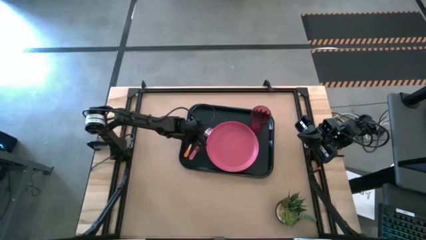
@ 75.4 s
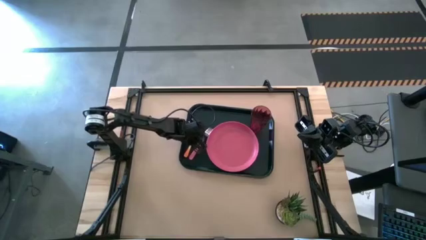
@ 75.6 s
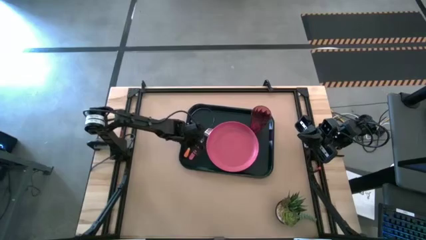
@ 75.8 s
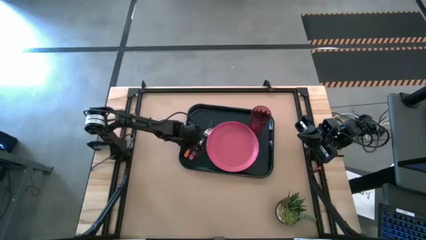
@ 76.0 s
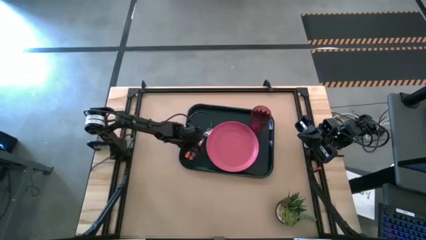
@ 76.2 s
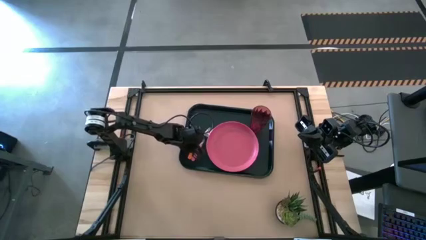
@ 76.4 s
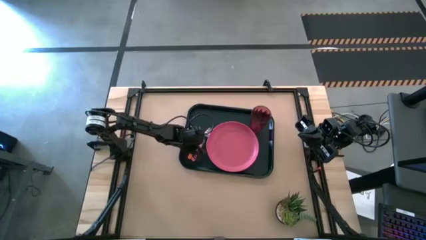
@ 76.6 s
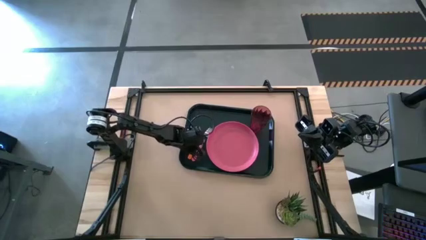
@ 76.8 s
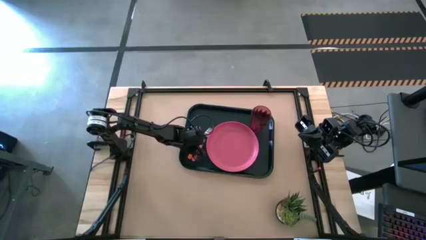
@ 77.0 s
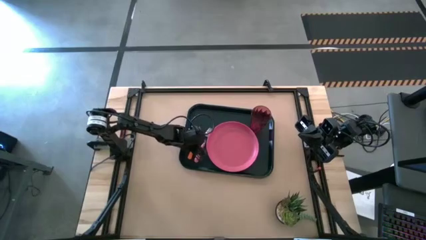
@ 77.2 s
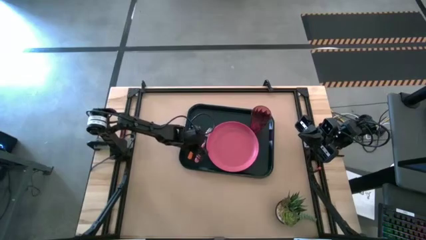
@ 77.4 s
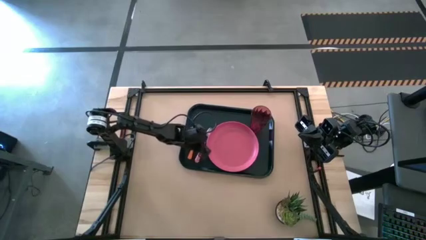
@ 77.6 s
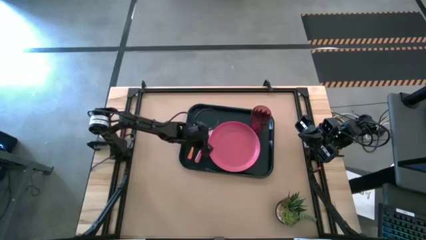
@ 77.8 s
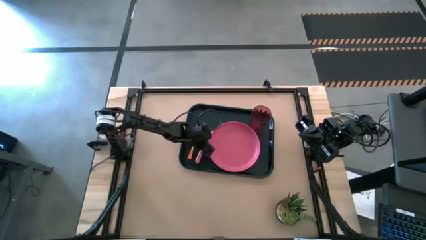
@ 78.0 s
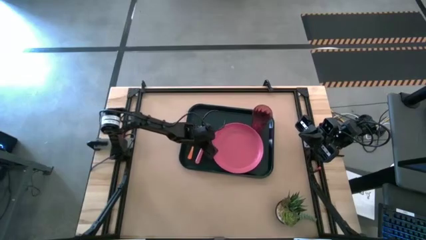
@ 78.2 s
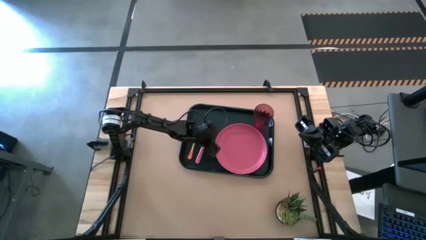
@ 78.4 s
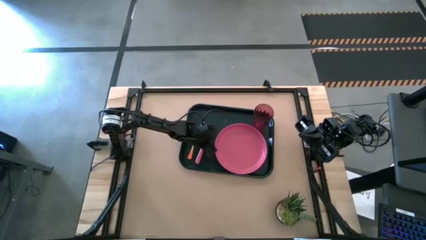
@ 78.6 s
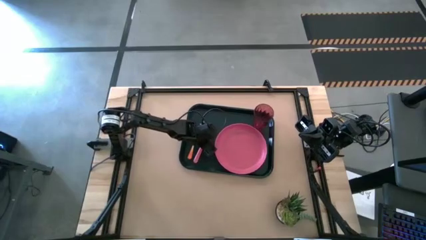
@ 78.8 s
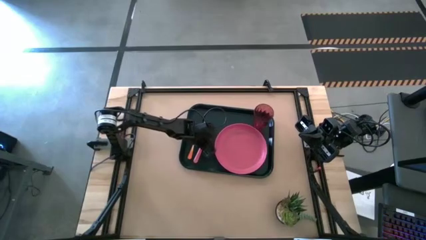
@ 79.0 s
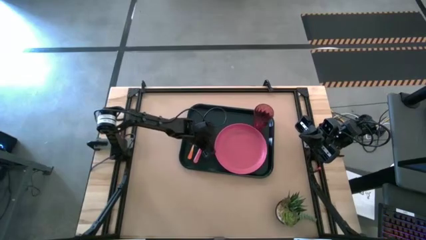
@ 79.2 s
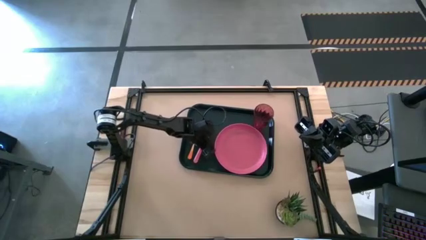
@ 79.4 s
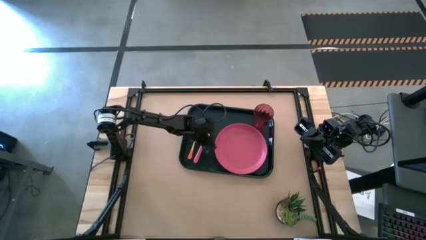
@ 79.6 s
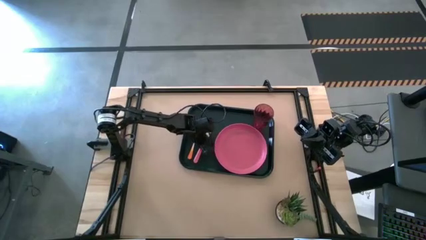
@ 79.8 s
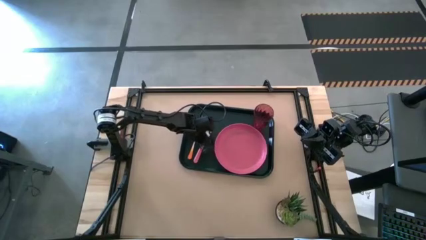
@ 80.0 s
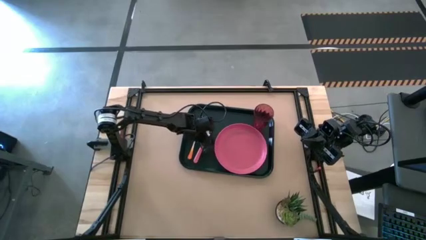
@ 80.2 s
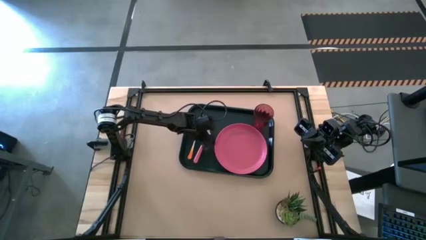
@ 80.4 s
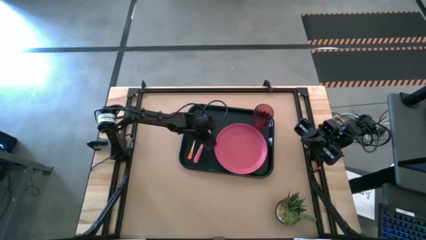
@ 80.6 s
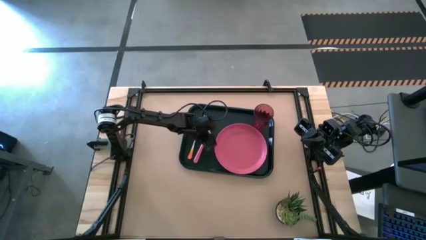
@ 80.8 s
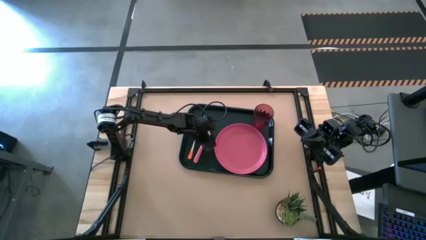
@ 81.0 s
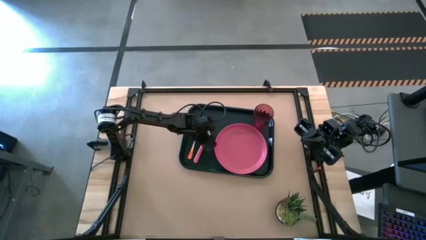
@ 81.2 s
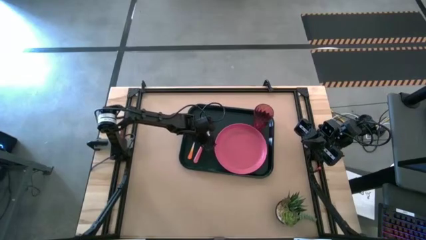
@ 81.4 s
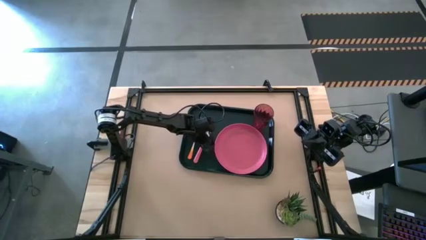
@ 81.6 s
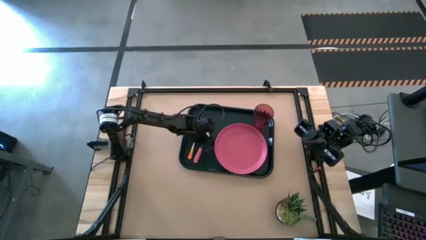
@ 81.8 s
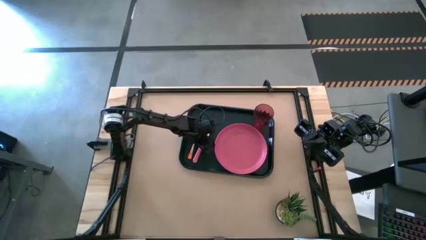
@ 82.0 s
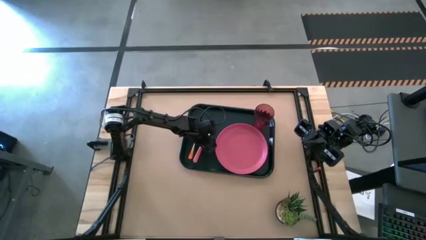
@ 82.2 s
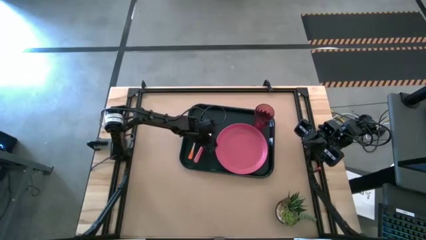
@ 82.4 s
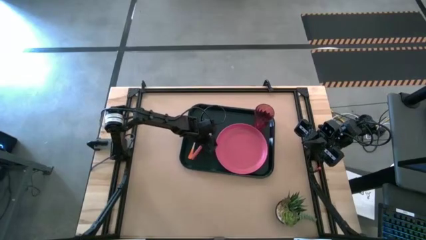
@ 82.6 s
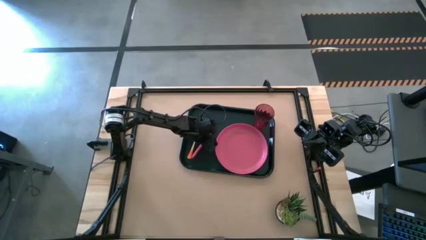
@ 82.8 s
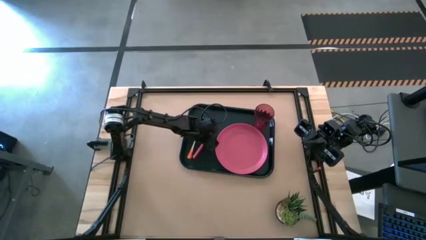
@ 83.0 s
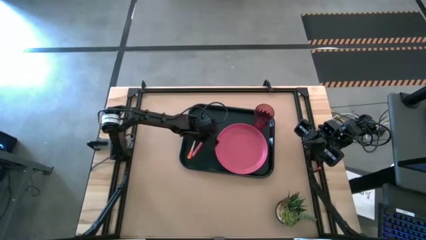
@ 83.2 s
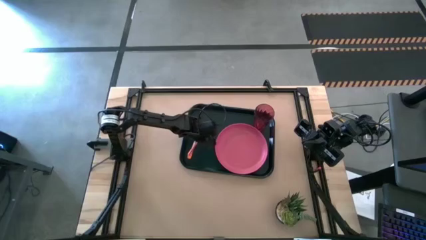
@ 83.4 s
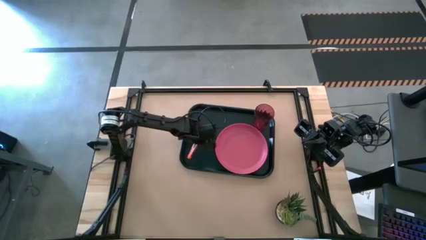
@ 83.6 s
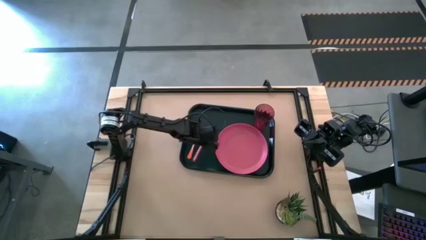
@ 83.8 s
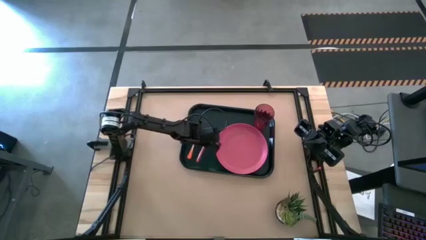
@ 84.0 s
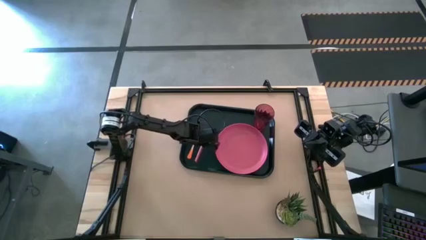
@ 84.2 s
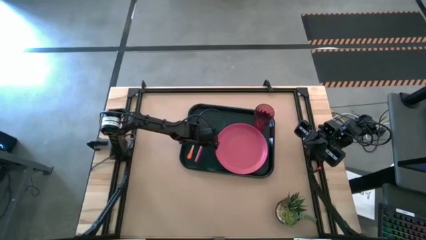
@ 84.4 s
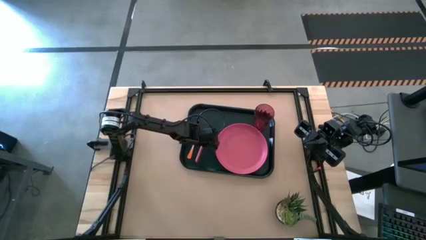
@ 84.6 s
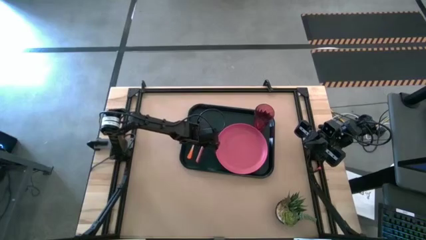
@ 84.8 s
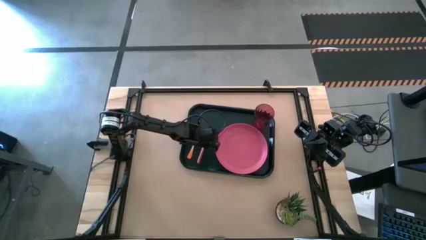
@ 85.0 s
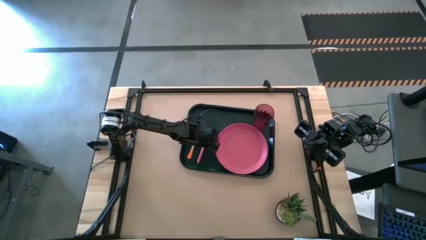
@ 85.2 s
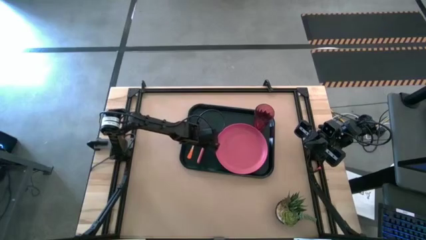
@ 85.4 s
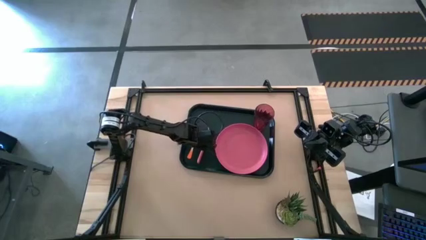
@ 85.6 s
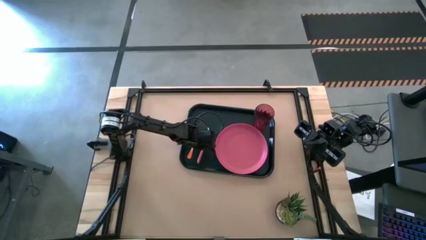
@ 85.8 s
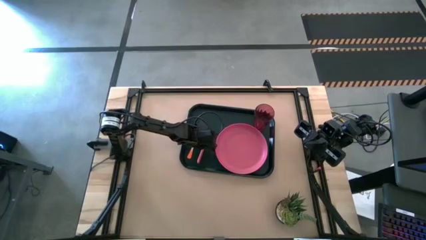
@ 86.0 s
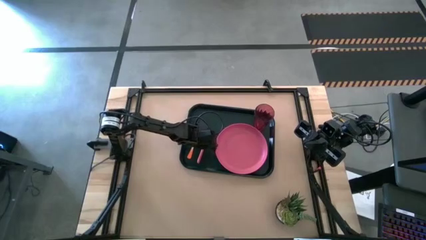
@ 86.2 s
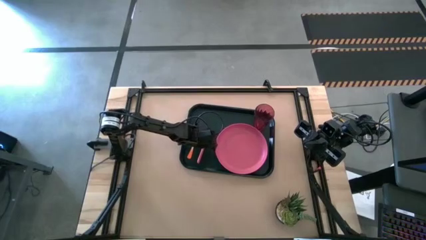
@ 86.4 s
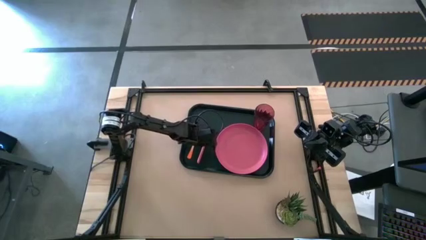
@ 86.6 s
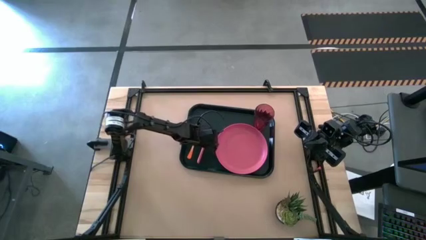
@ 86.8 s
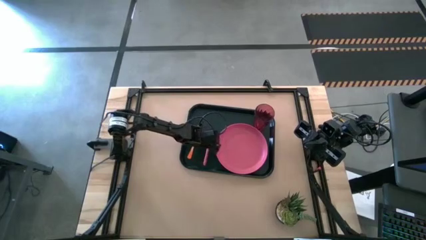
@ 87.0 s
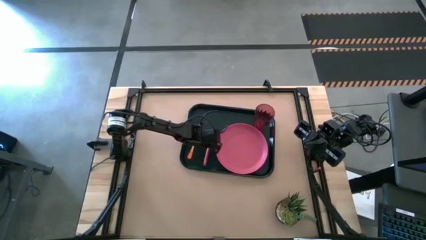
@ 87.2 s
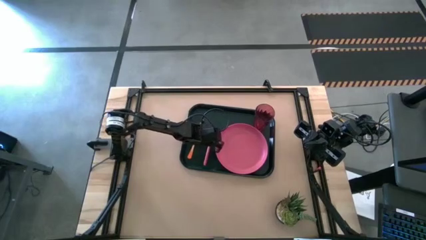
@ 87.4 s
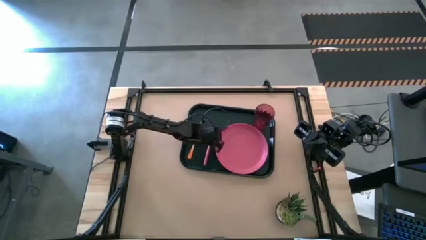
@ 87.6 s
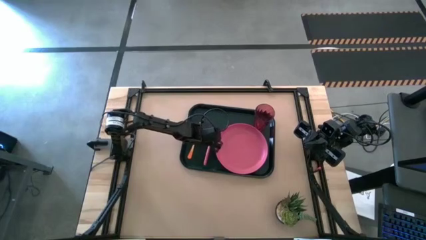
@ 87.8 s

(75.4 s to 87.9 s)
Task: Pick and place plate/cup/fork/spoon on tray
Adjust the pink fork on the black serving tray

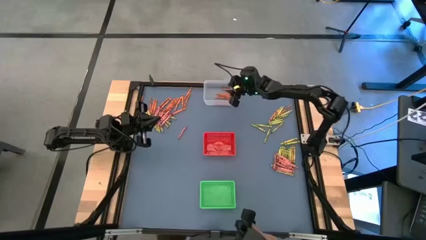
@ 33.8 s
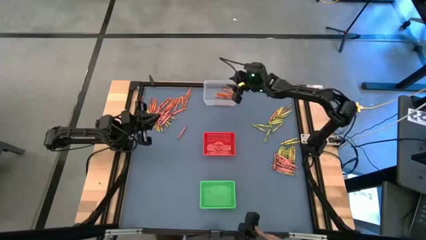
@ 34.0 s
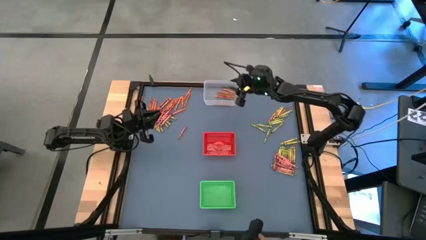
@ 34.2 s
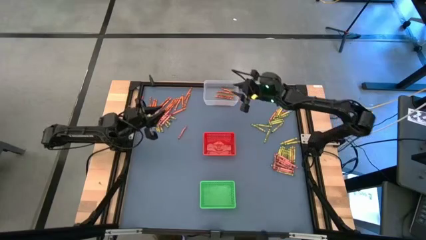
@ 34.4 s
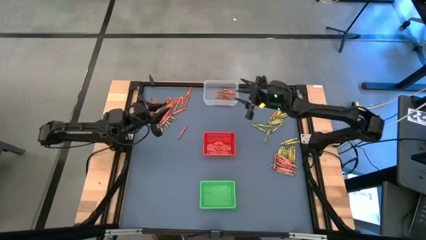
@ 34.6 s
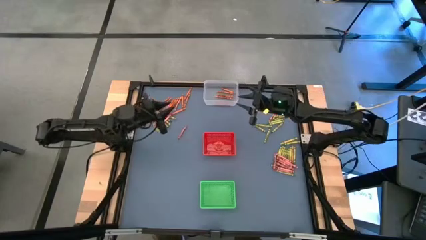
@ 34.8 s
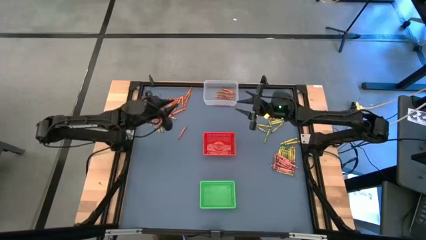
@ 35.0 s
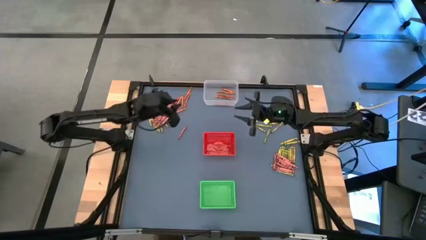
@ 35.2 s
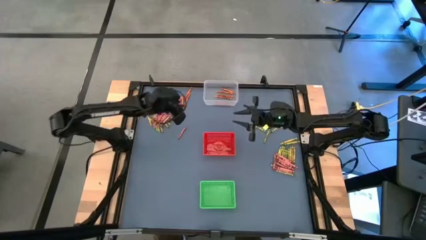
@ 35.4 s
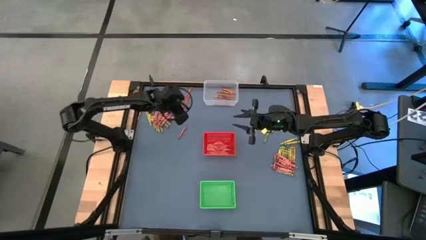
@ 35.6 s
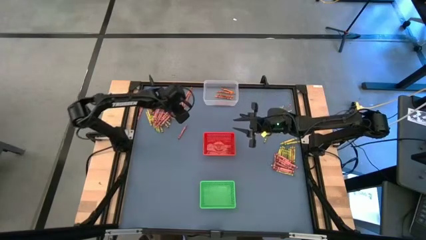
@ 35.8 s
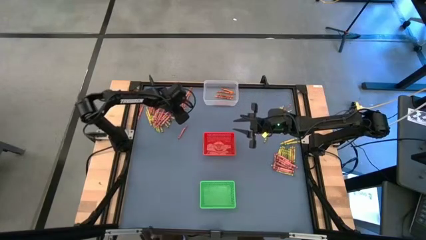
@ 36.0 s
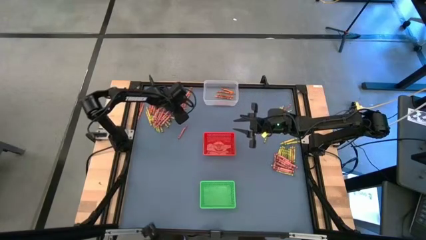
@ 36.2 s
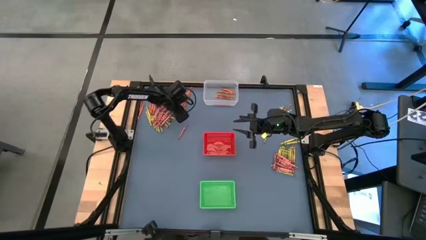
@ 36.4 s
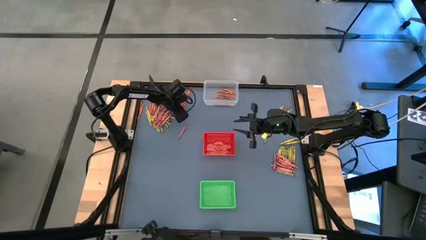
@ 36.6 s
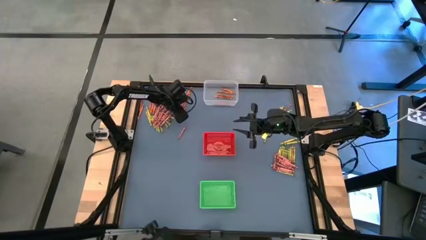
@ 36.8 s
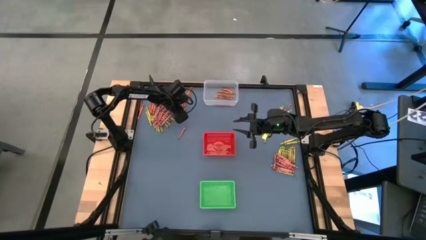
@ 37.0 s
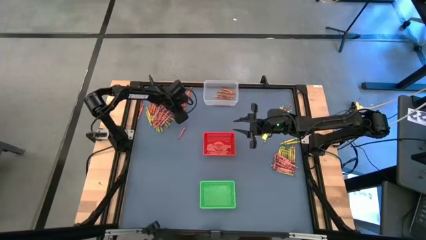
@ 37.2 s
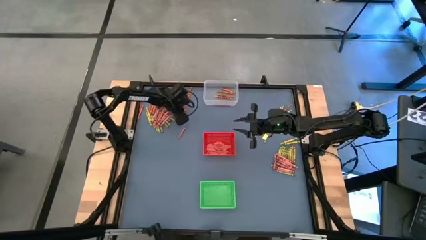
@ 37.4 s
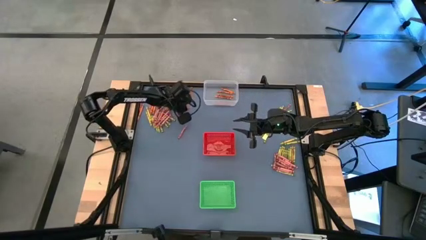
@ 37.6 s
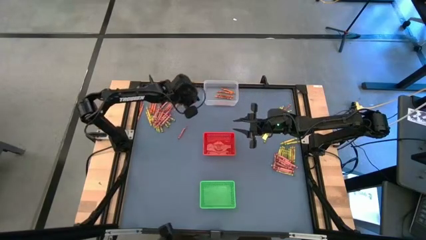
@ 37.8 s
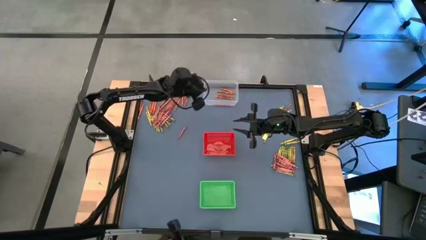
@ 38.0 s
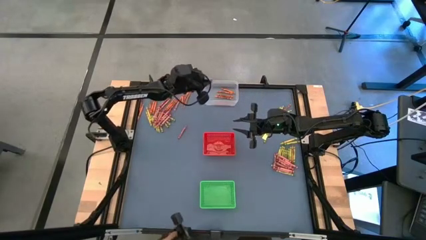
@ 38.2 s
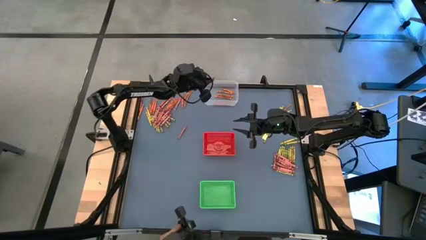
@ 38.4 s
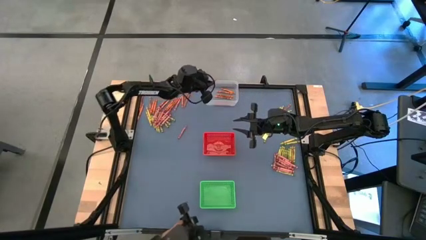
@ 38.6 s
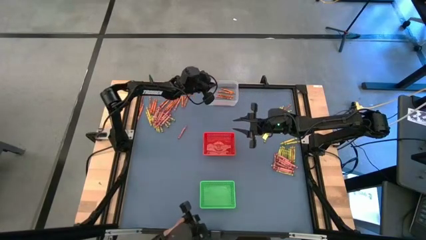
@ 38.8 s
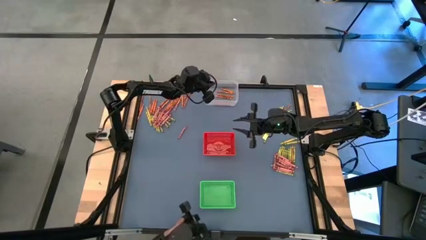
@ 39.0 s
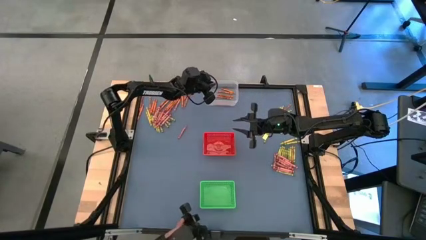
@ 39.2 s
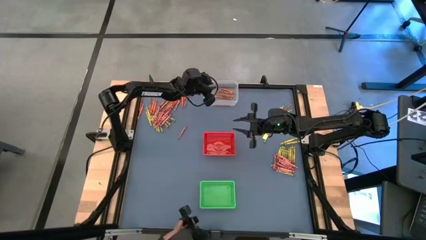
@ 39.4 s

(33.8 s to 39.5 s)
Task: Sort crayons
Put the orange crayon into the transparent bin
